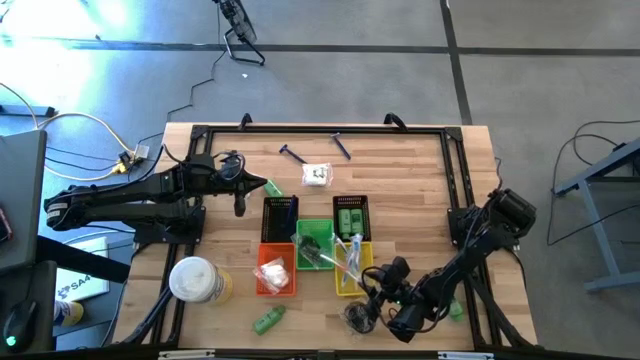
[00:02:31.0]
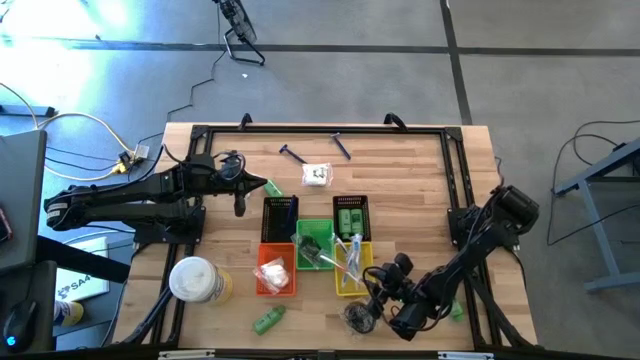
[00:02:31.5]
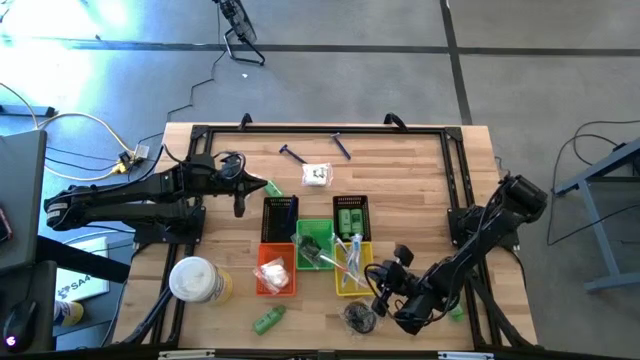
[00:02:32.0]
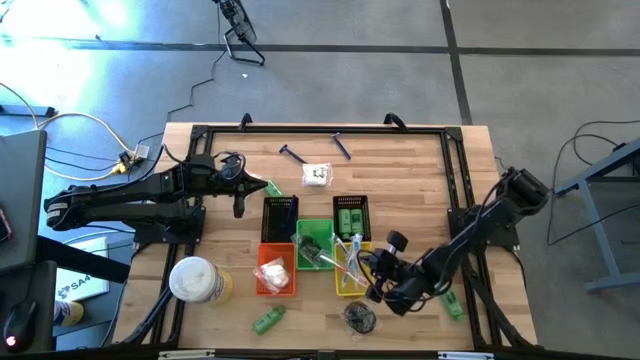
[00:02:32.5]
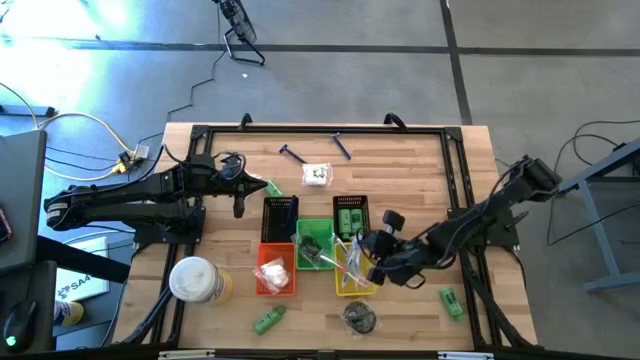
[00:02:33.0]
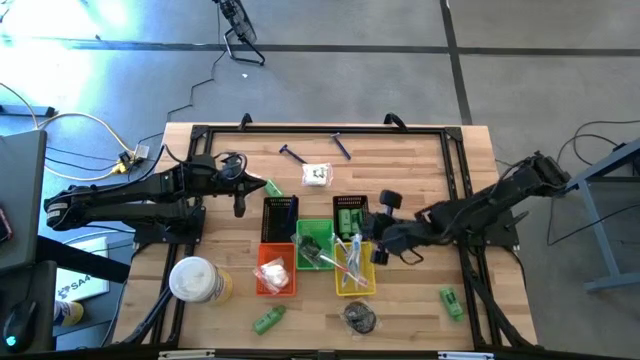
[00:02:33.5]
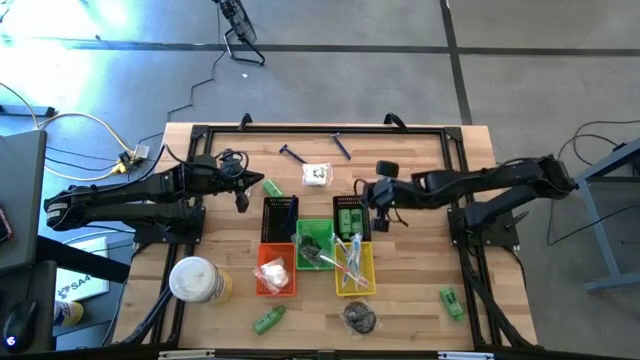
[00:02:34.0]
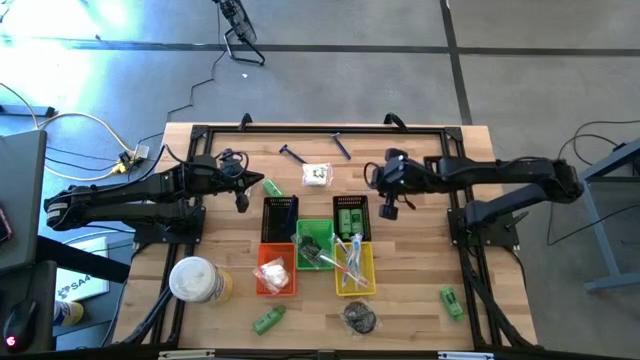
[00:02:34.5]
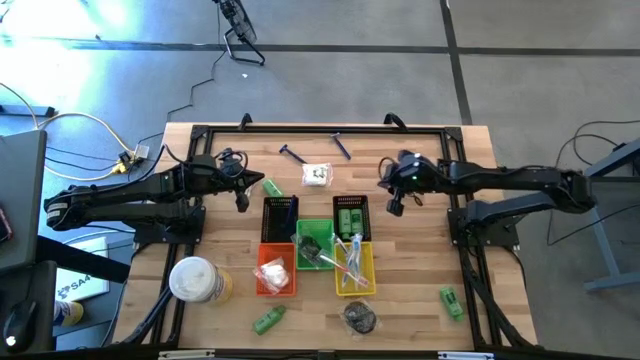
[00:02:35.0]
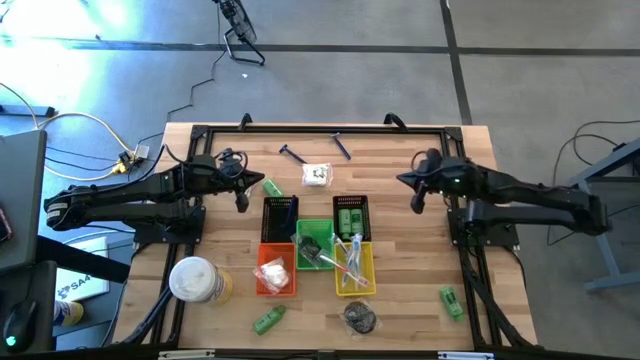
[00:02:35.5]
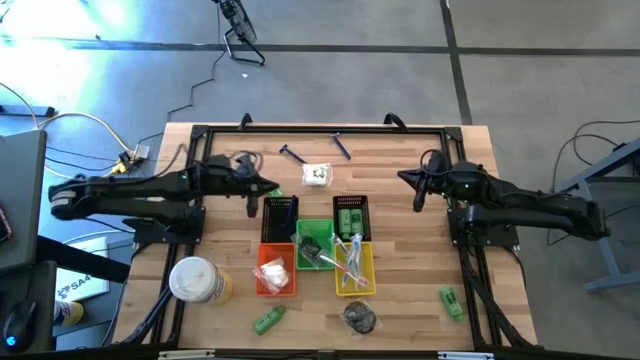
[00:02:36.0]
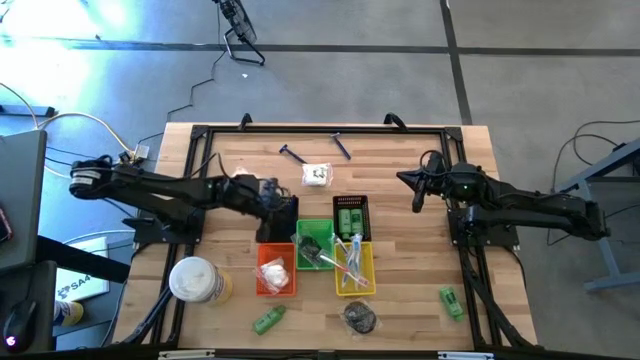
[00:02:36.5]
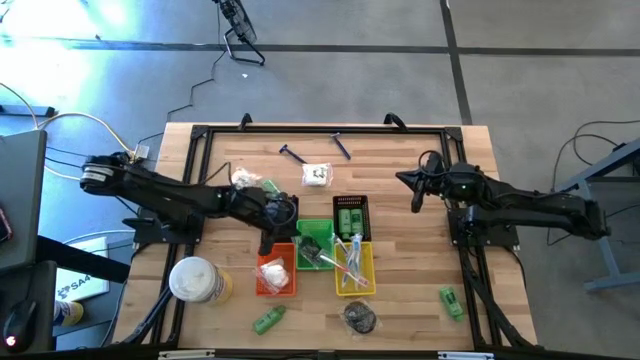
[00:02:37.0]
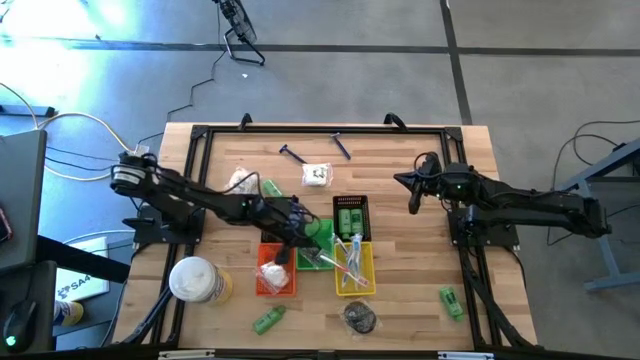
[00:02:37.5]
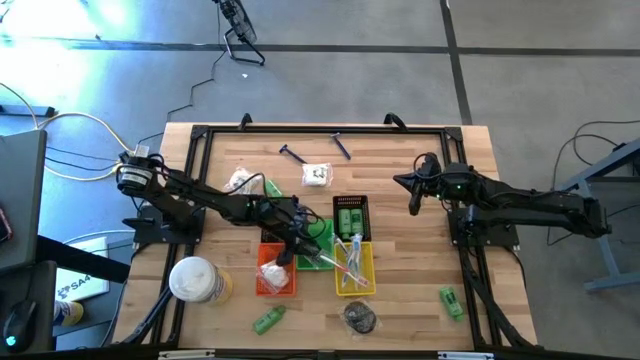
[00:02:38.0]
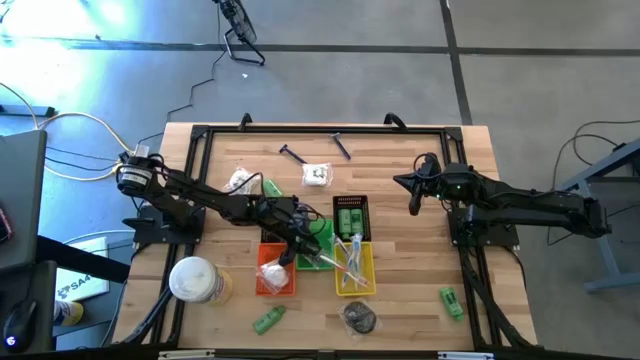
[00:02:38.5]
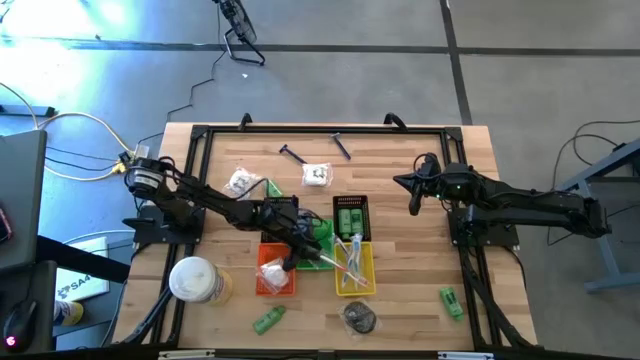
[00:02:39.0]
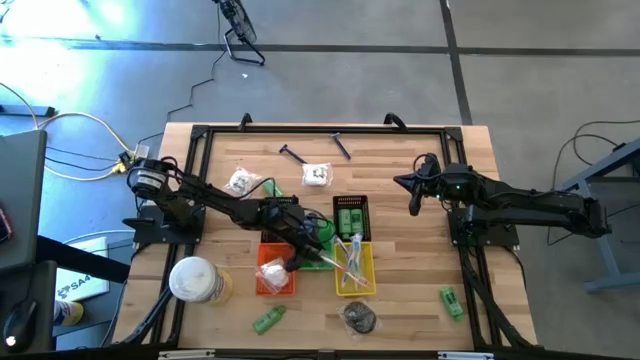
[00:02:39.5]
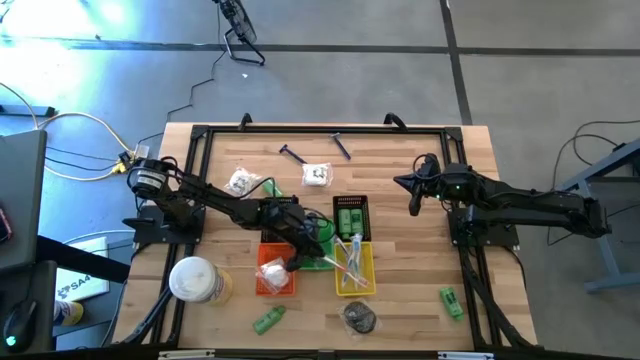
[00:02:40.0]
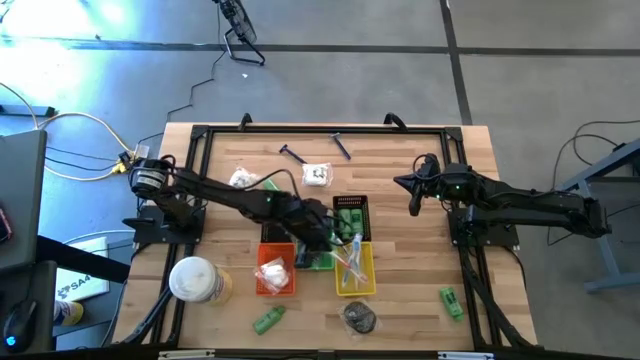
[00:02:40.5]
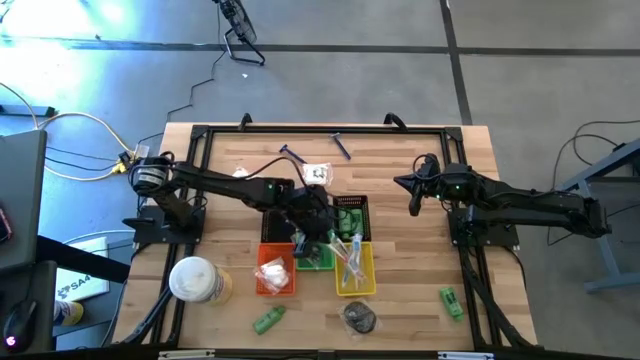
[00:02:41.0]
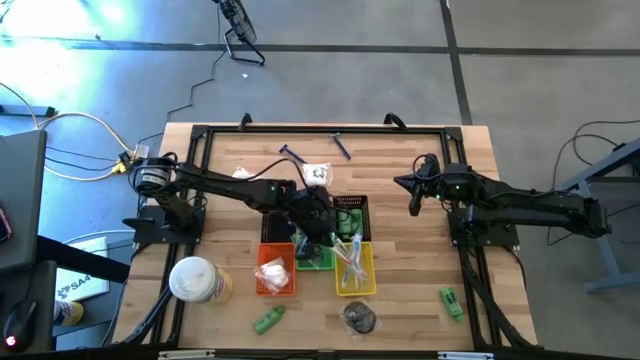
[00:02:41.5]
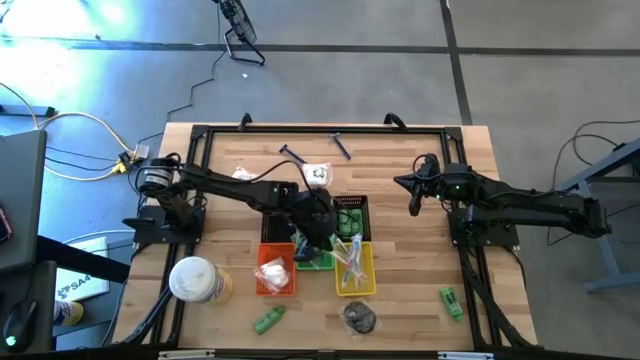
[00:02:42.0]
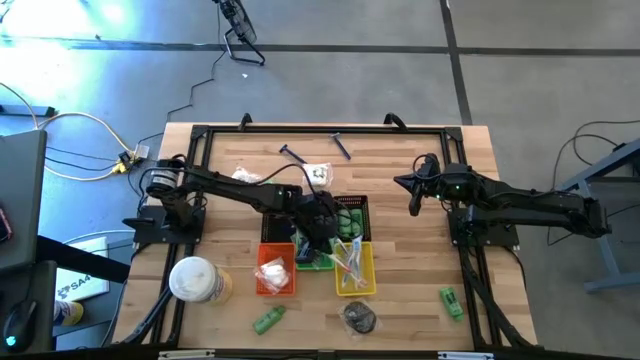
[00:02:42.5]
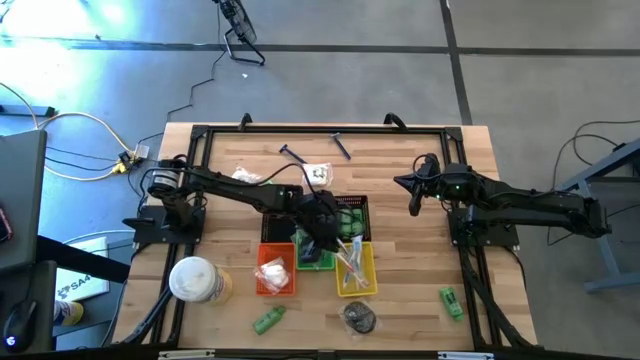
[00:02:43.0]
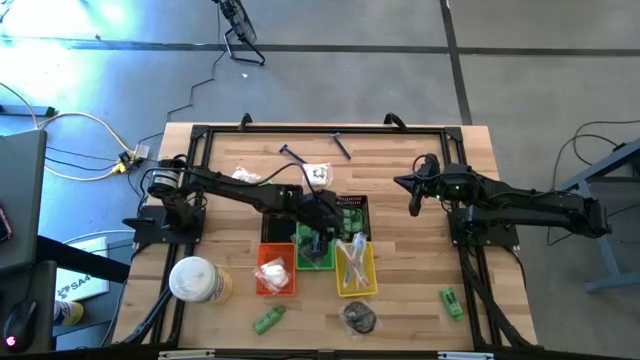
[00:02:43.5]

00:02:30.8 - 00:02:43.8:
Task: Pick & Place Travel size toiletries
Put the orange toothbrush into the yellow bin

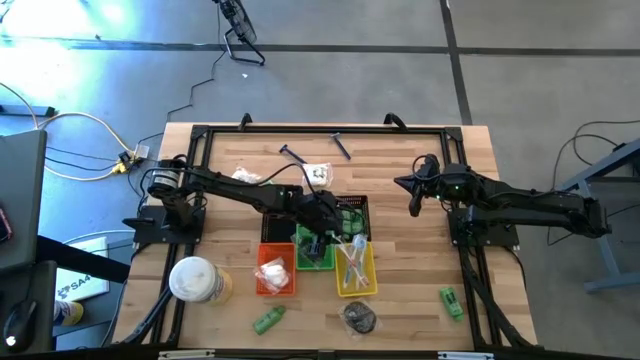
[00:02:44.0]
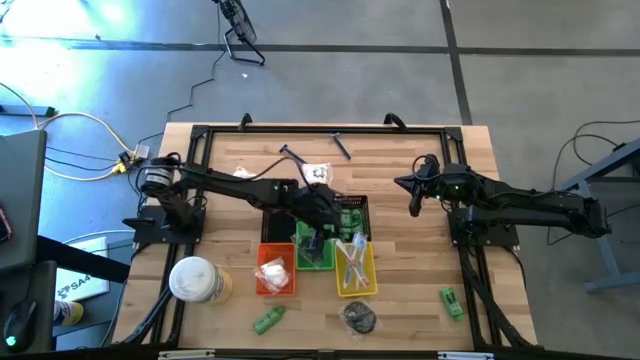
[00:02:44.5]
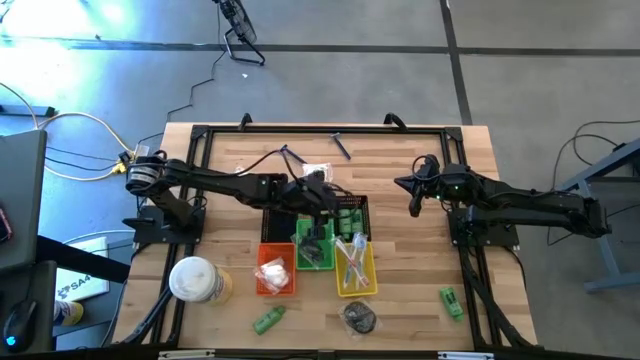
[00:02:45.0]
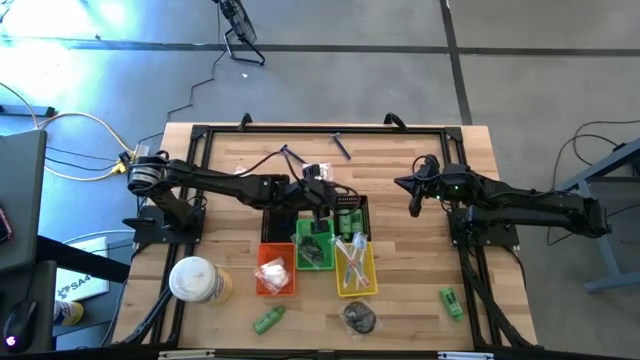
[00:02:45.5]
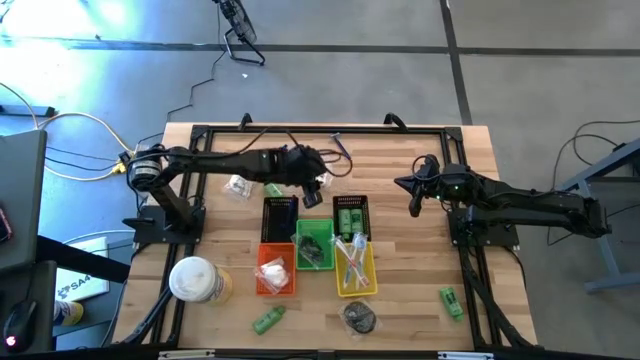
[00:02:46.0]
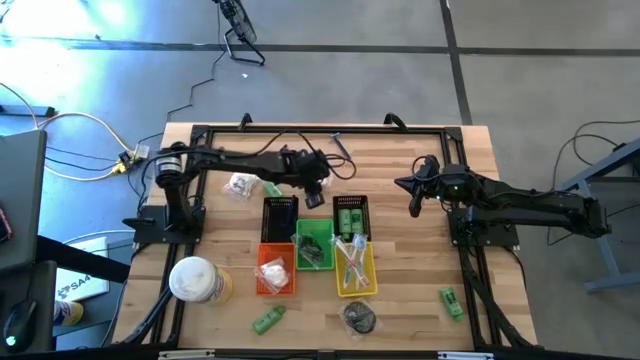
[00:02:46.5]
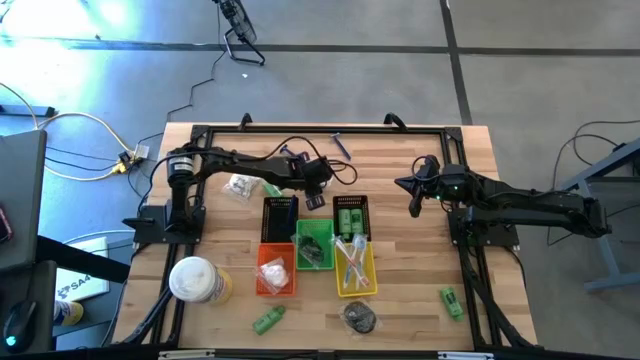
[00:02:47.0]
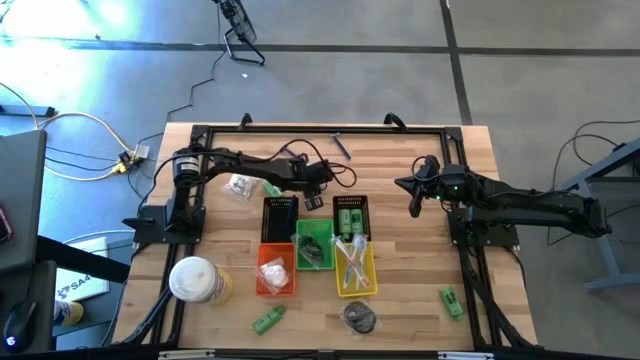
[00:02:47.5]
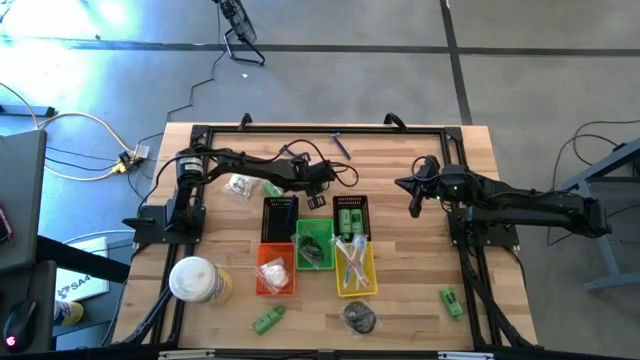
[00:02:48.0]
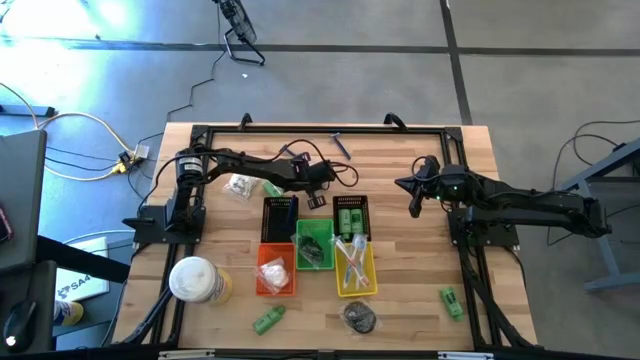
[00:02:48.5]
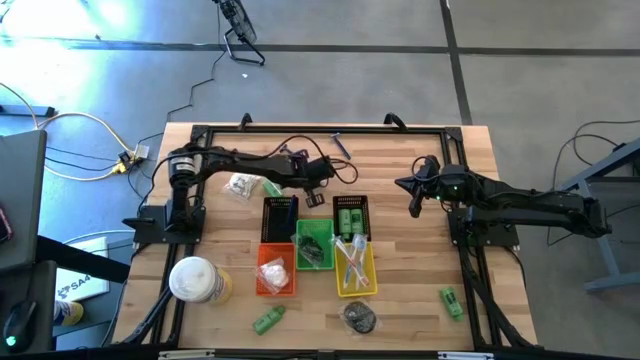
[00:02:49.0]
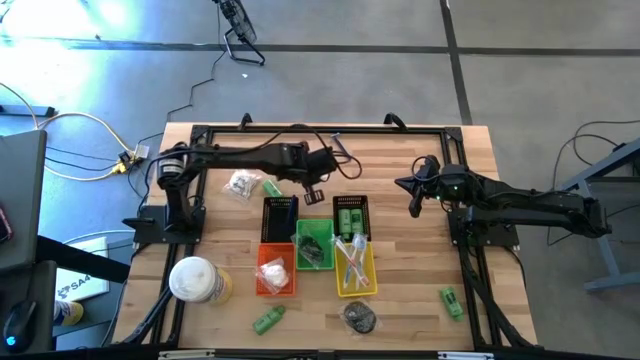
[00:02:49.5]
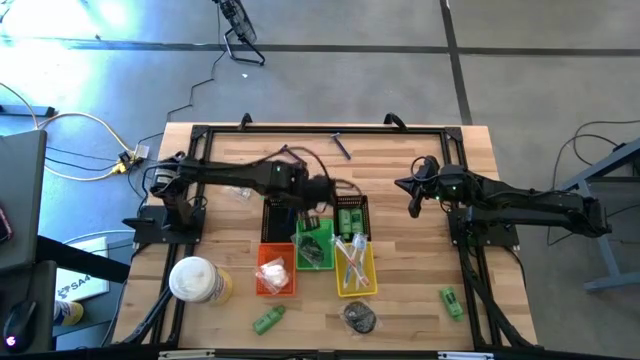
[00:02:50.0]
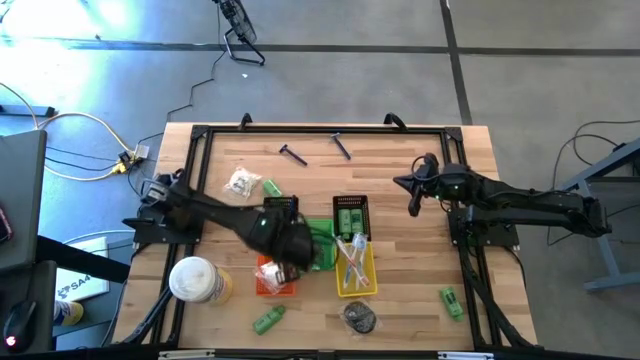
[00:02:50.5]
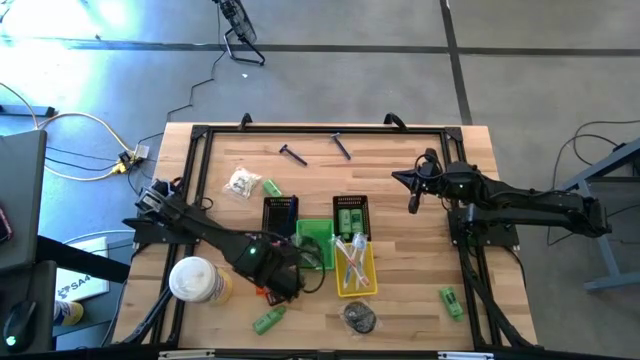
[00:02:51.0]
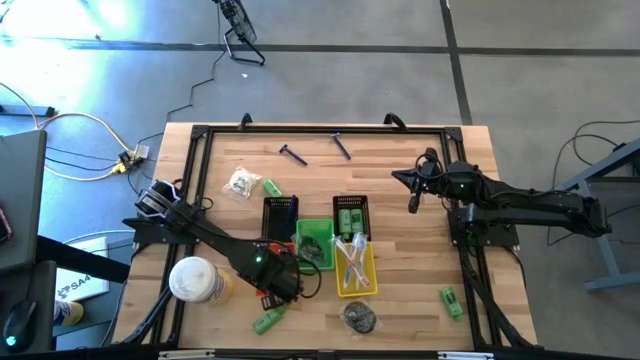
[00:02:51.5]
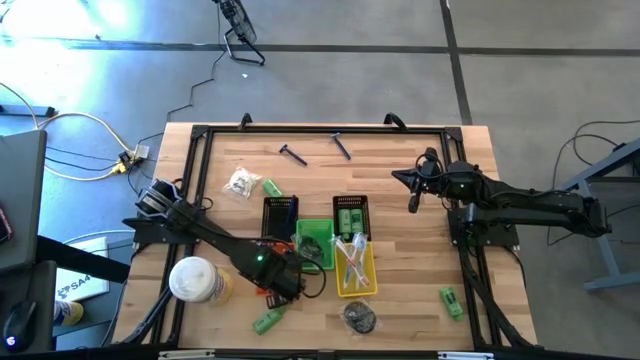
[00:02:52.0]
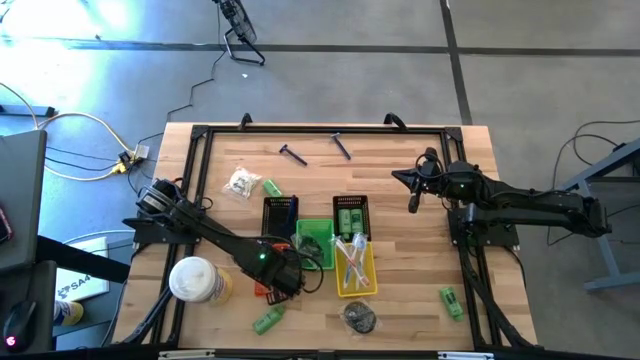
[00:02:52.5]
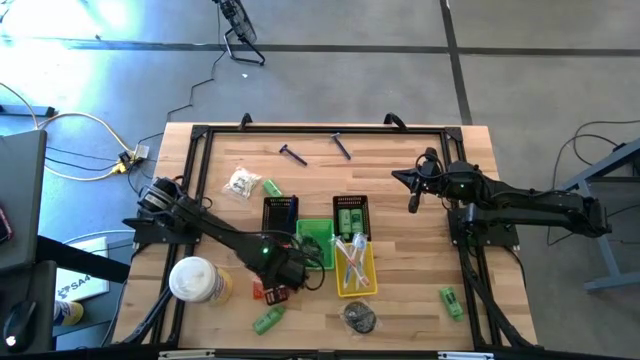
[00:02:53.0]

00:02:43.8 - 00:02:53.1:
Put the right white vanity pack into the orange bin
